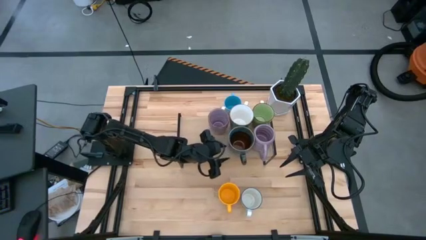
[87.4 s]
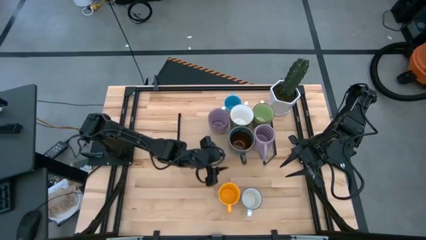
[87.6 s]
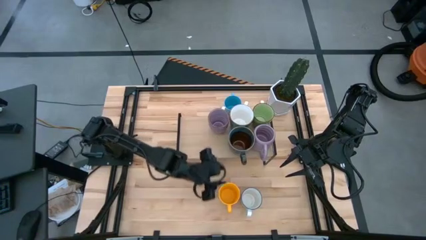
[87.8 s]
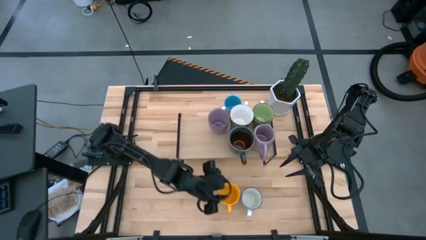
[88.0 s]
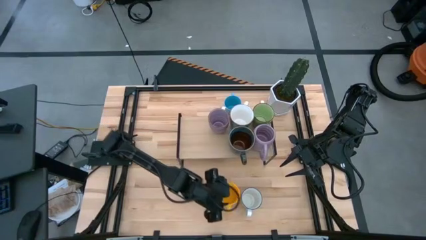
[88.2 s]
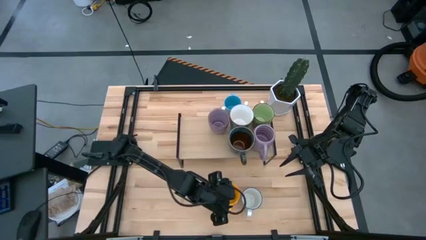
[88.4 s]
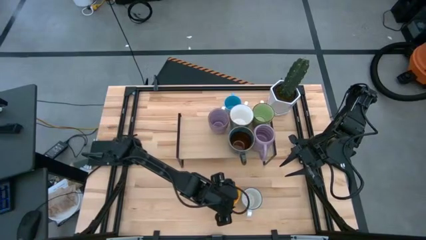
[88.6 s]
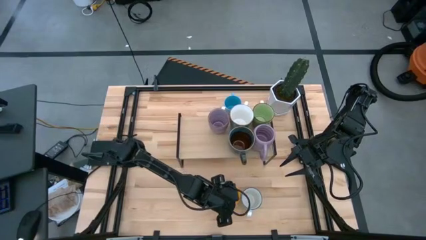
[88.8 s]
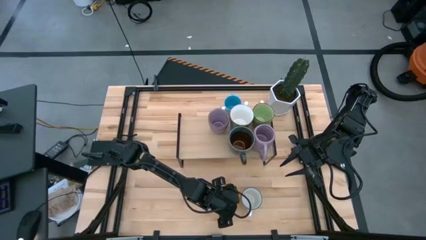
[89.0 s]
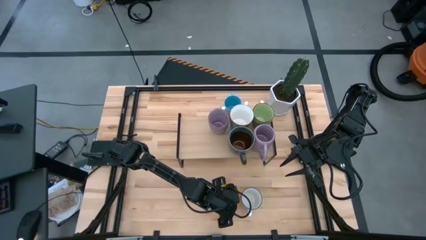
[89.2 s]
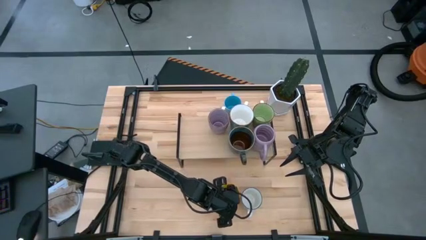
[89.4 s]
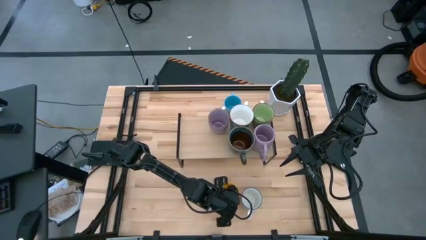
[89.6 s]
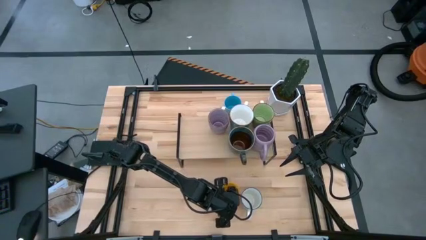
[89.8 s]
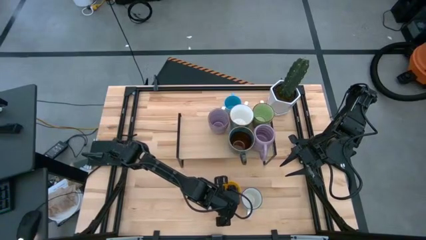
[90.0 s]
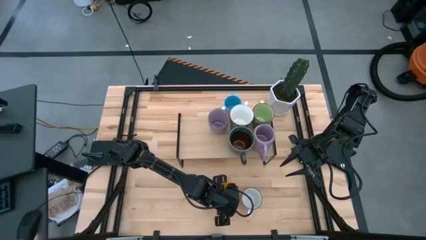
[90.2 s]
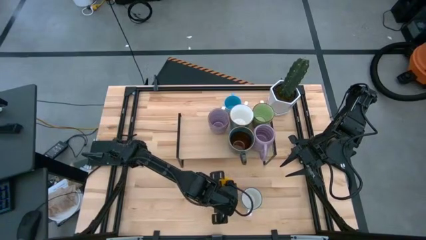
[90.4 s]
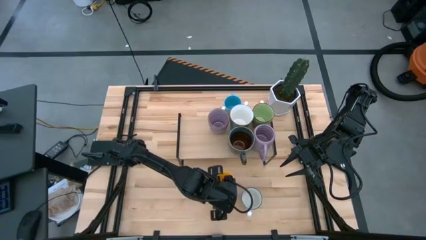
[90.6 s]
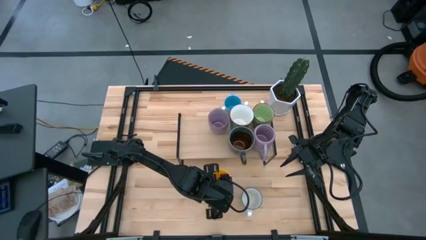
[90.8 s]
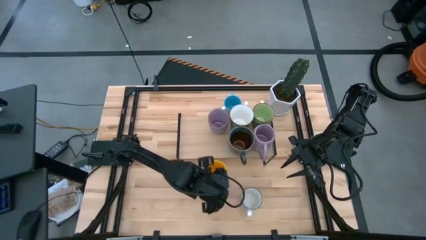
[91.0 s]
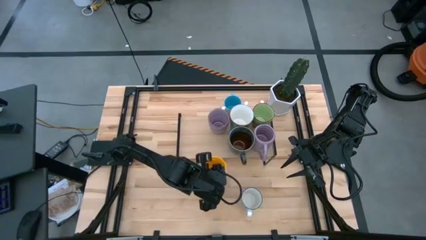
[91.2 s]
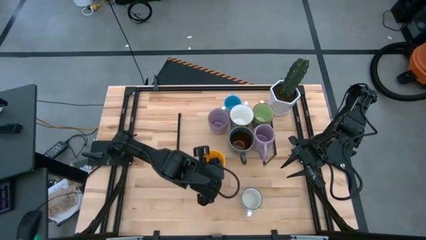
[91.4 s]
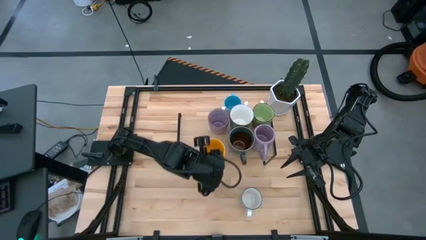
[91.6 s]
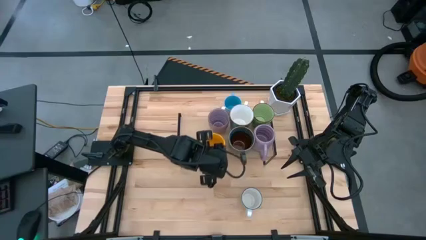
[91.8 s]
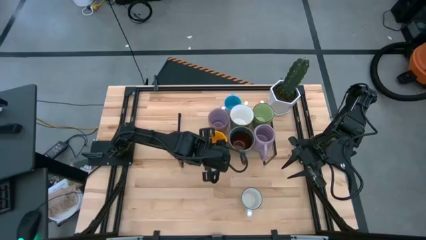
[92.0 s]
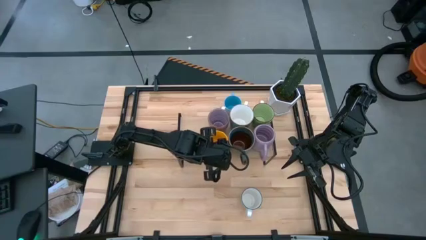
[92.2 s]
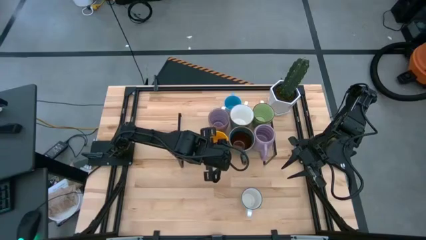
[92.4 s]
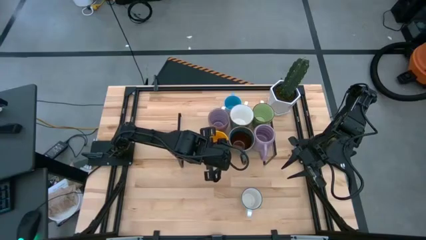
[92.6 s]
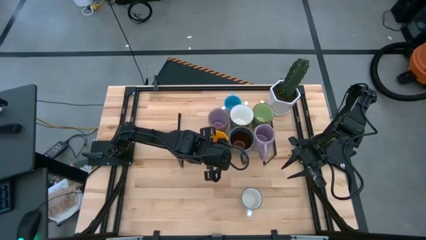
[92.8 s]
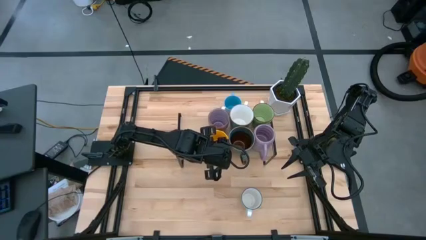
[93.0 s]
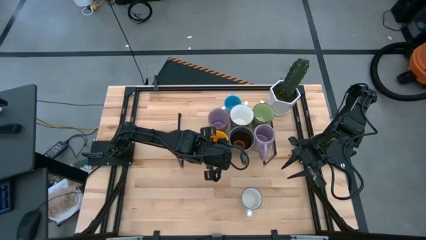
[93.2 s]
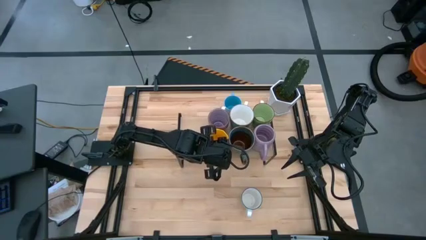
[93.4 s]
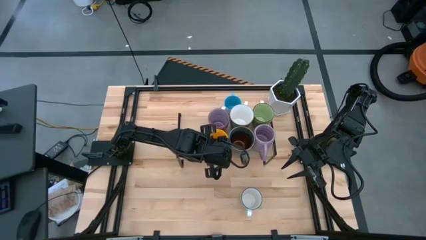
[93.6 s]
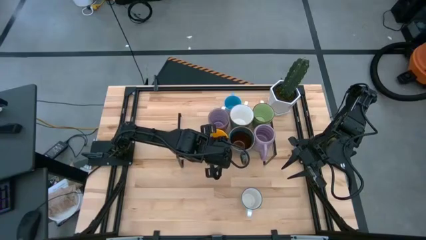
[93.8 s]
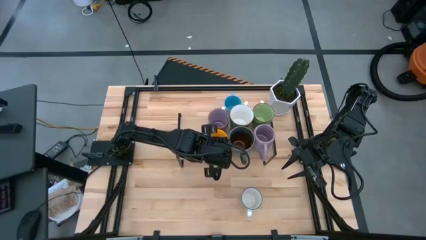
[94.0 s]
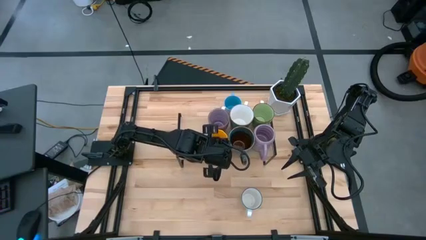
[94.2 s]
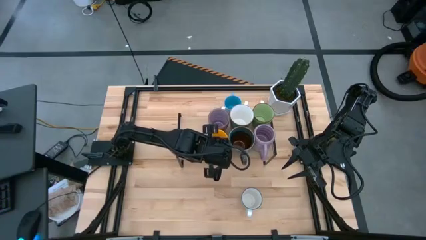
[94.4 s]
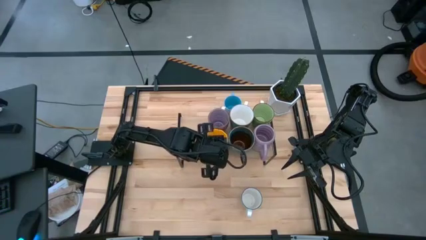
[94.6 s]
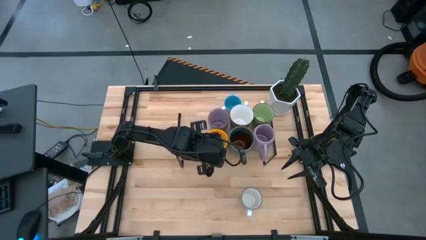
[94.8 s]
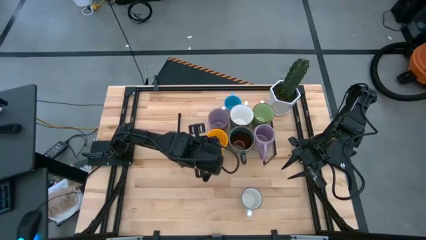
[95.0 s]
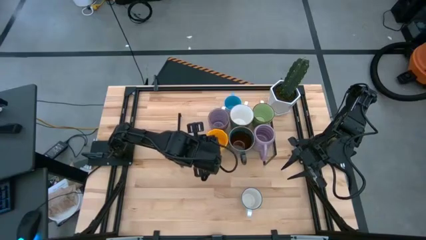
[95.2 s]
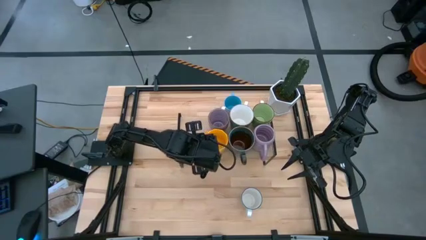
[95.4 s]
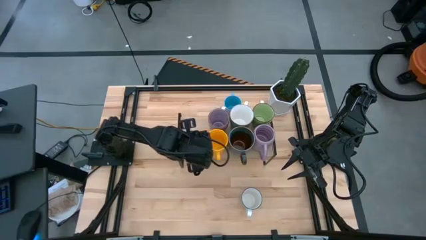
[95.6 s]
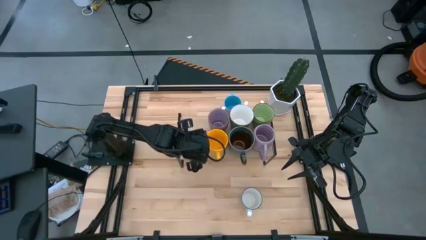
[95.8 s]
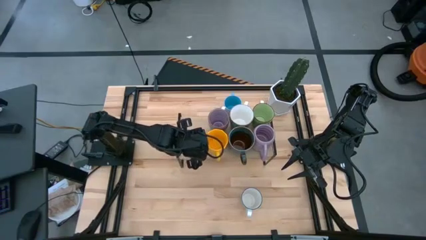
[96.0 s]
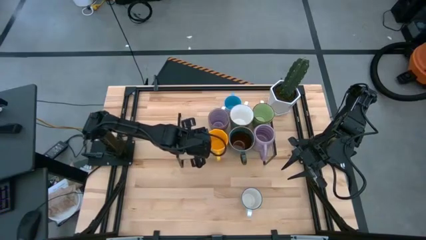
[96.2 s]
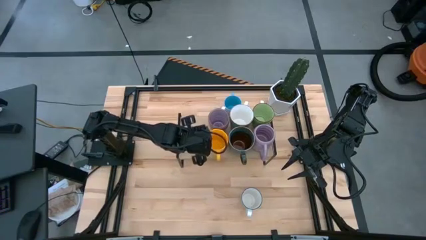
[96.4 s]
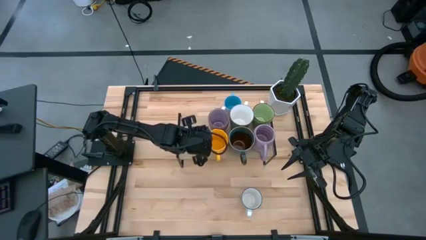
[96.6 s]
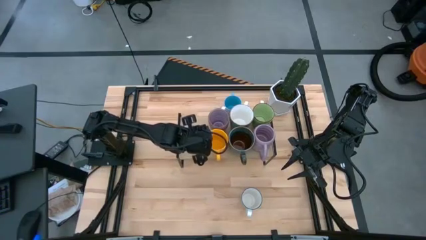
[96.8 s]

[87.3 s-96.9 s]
Task: Place coffee mugs
Put the yellow mug on the shelf

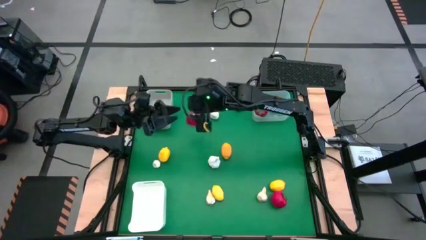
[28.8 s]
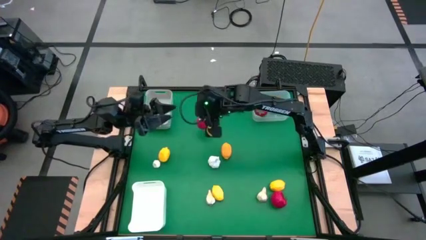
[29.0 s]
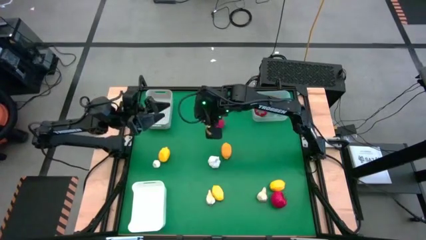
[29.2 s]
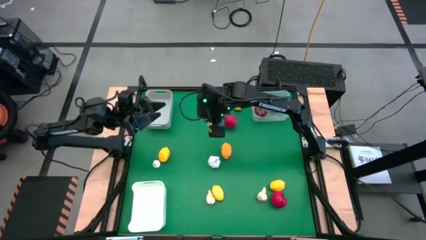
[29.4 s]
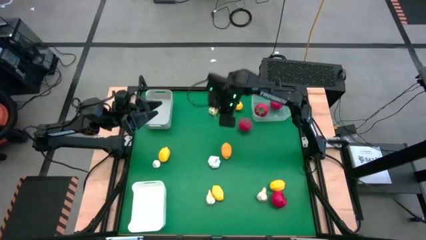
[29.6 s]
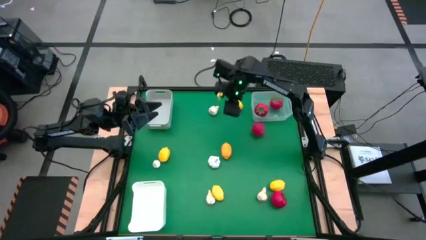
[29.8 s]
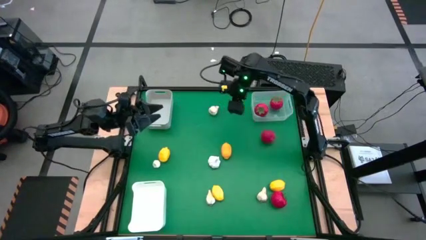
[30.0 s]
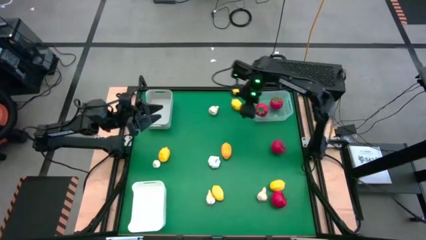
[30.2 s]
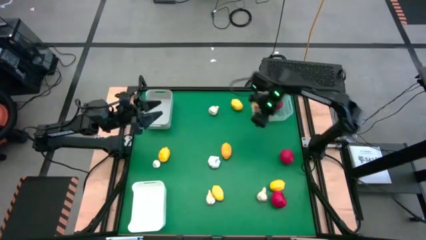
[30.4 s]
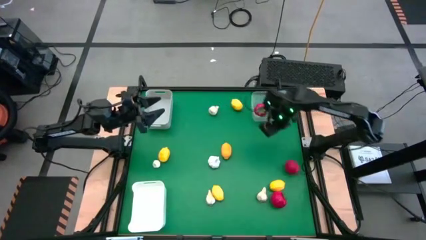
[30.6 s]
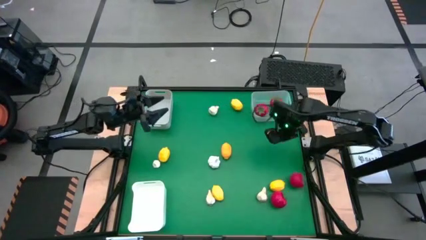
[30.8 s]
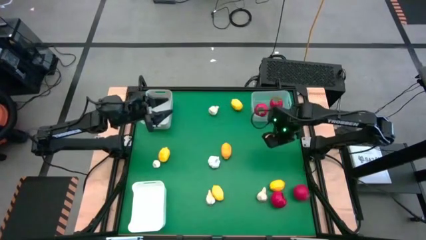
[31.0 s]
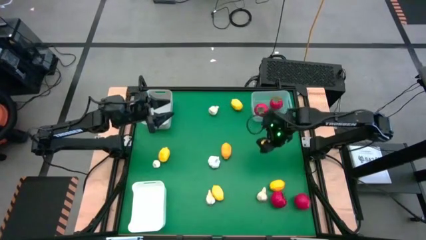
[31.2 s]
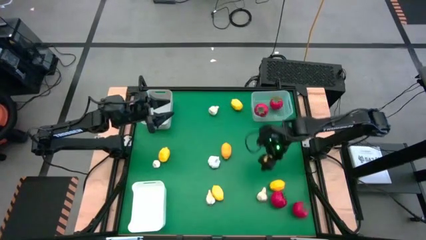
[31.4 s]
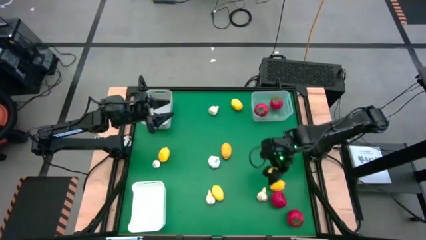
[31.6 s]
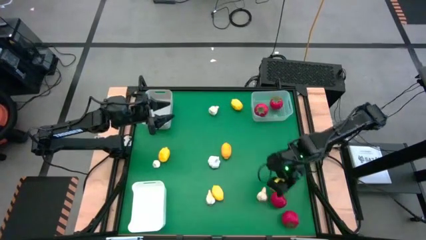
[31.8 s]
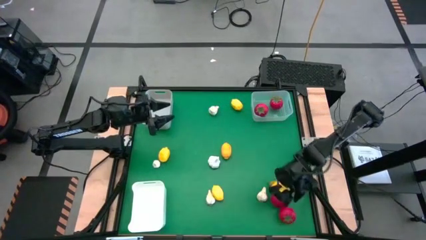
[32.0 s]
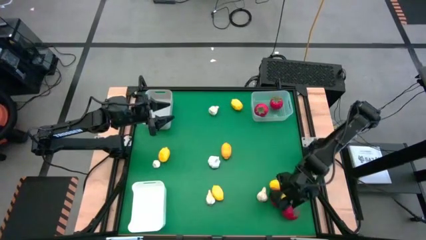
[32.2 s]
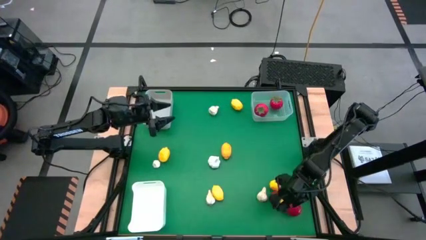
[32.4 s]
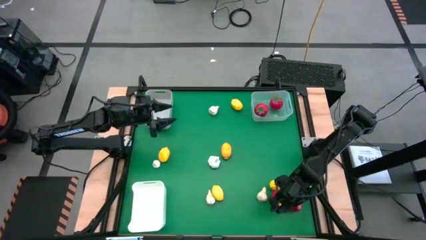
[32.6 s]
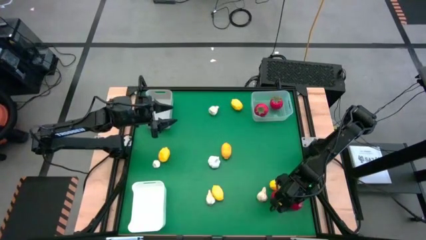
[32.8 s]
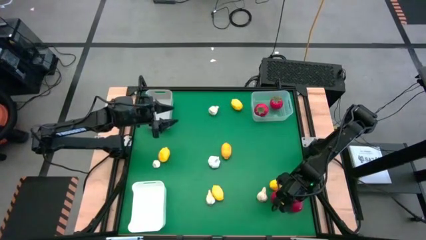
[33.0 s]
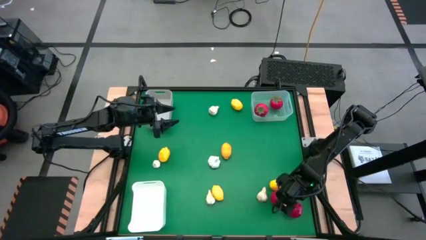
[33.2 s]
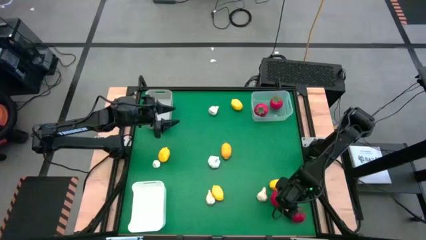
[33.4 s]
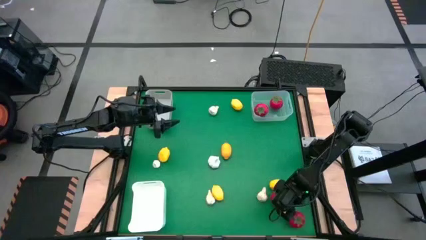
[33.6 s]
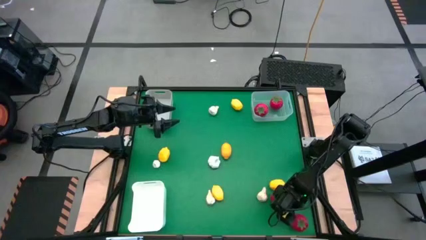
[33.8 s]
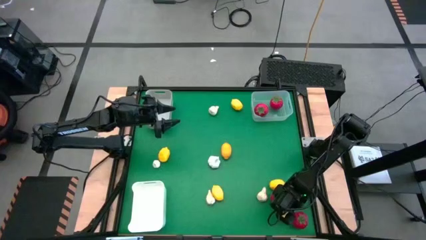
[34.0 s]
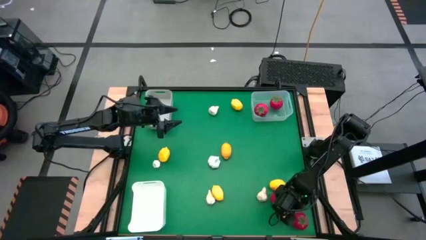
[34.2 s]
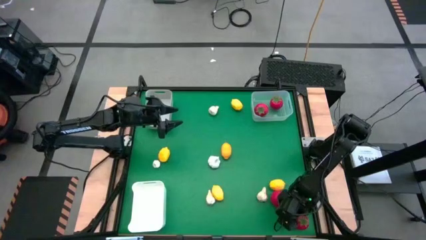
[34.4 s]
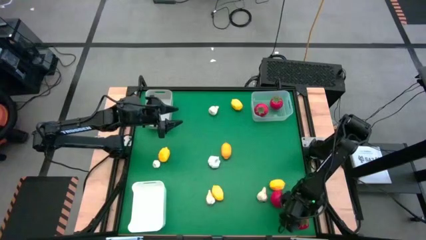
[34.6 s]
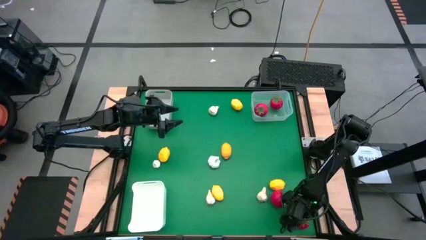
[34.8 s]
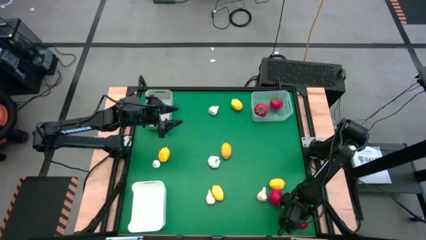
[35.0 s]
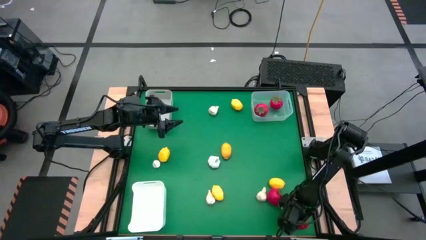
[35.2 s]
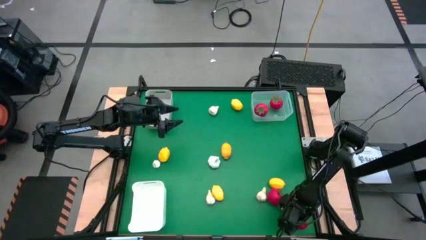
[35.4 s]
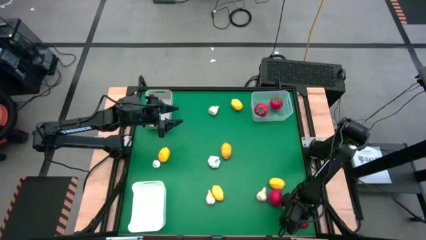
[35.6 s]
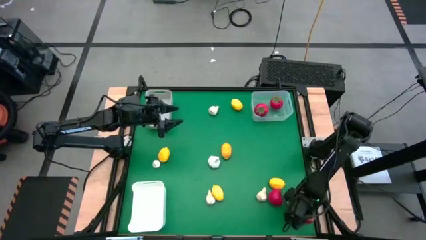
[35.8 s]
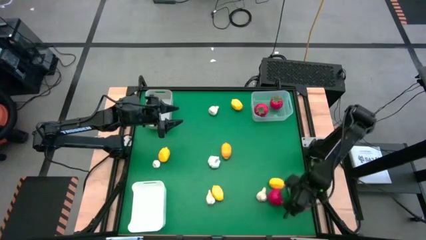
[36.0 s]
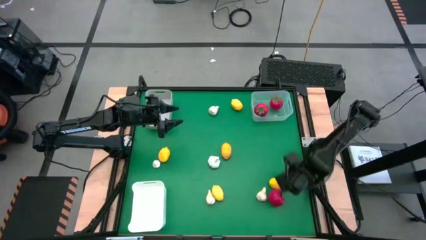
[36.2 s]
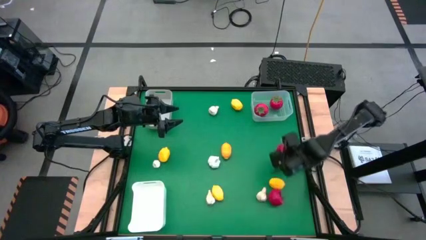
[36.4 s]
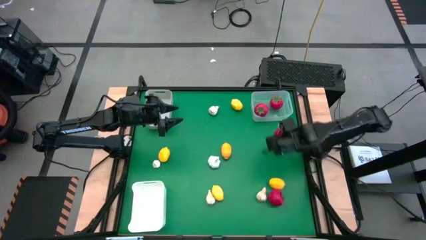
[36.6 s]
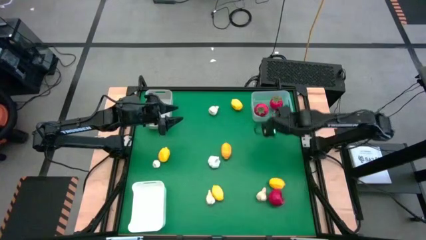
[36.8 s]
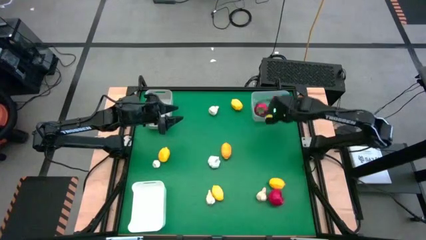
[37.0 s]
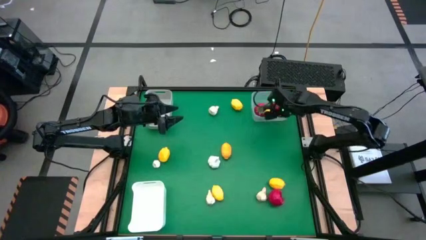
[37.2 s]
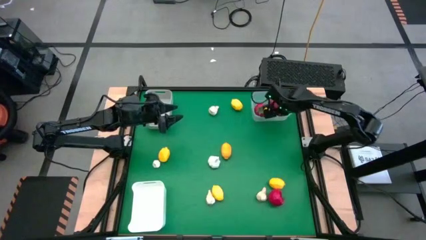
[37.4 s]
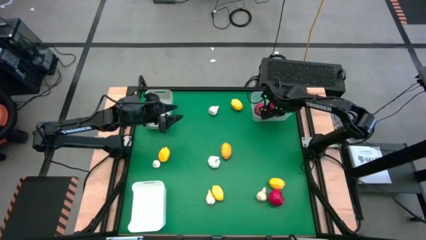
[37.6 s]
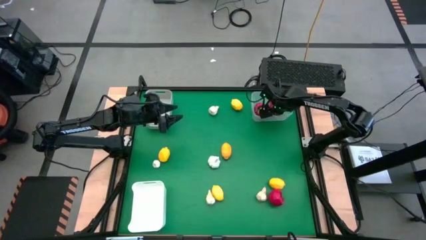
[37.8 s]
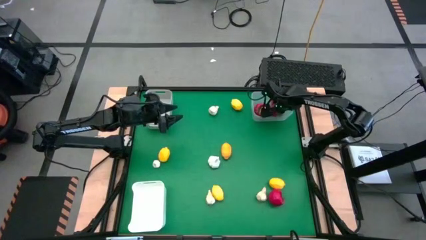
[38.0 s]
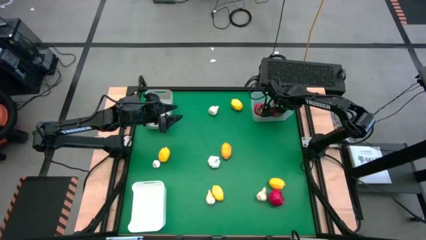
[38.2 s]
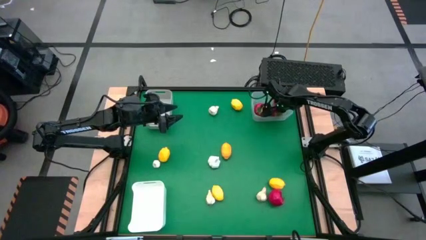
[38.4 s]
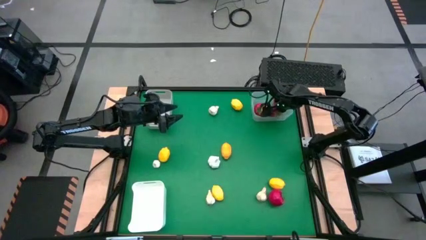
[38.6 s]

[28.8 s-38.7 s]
Task: Sort produce into baskets
Put the tomato into the transparent bin
